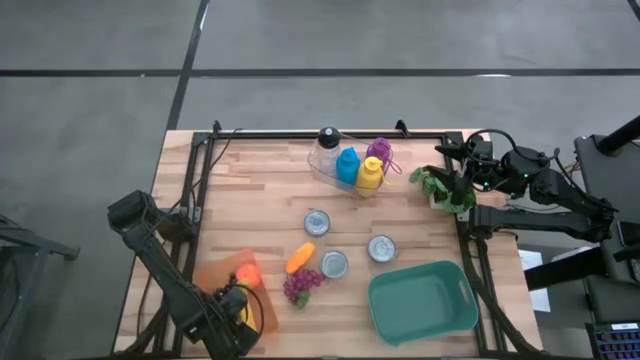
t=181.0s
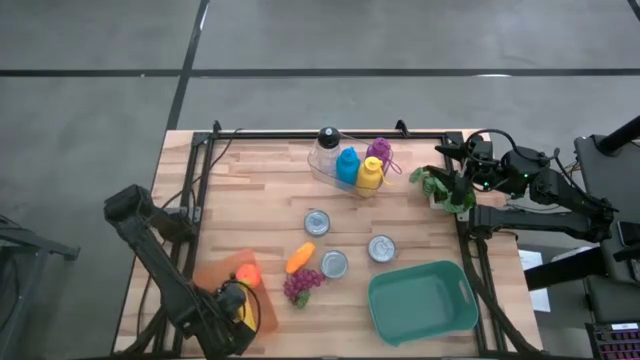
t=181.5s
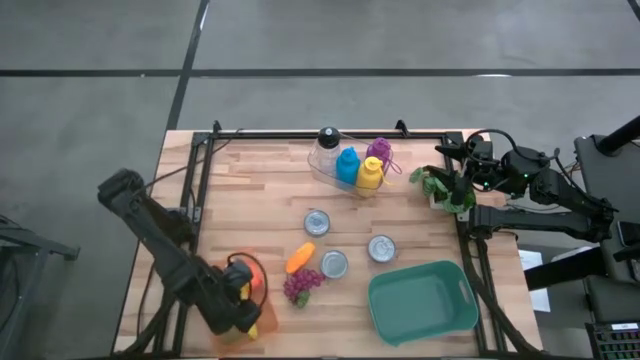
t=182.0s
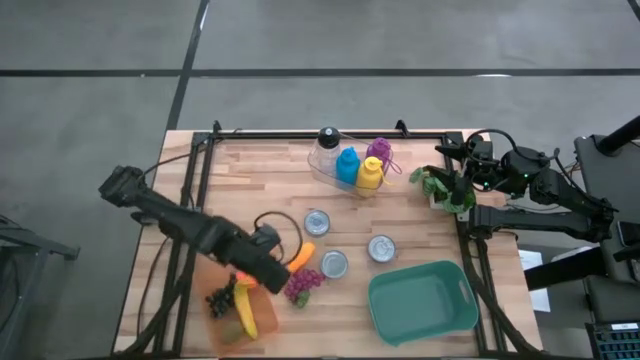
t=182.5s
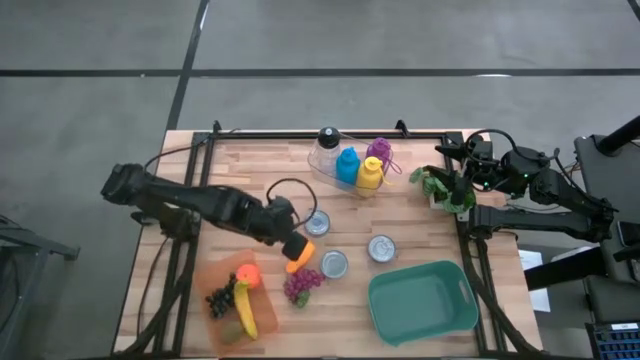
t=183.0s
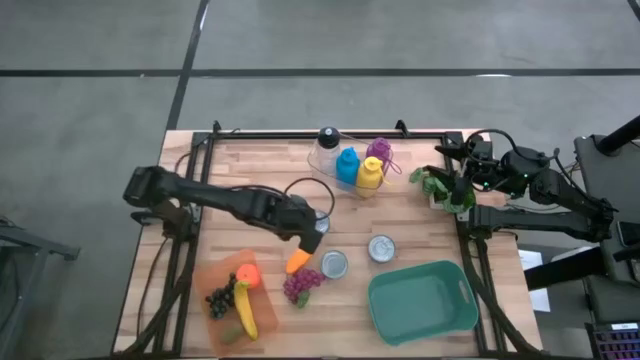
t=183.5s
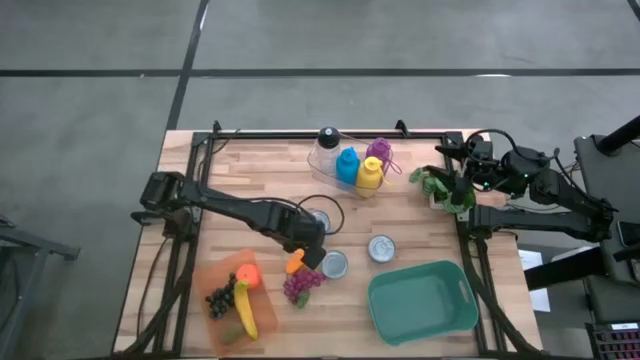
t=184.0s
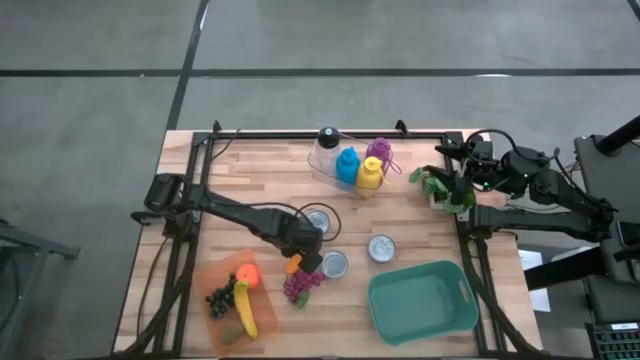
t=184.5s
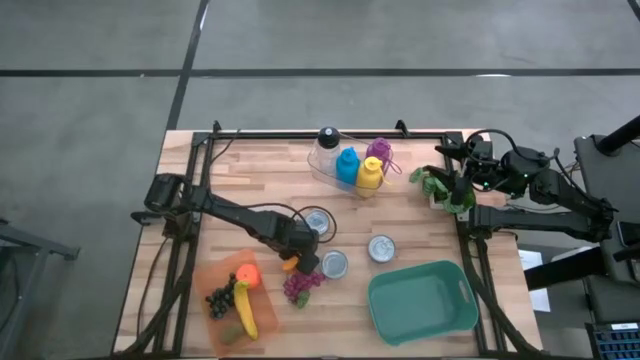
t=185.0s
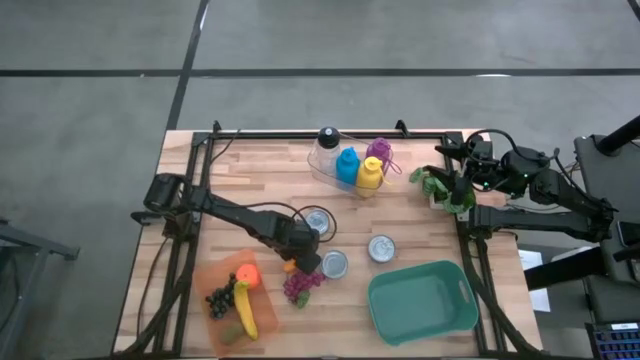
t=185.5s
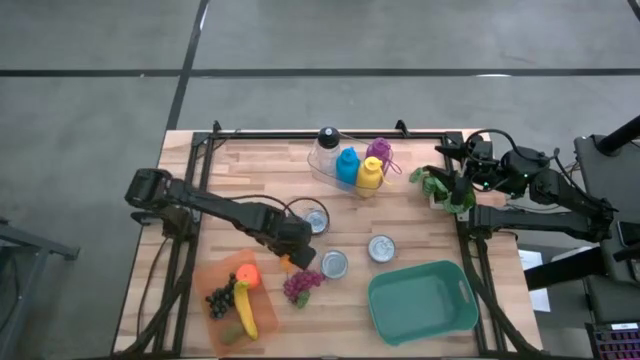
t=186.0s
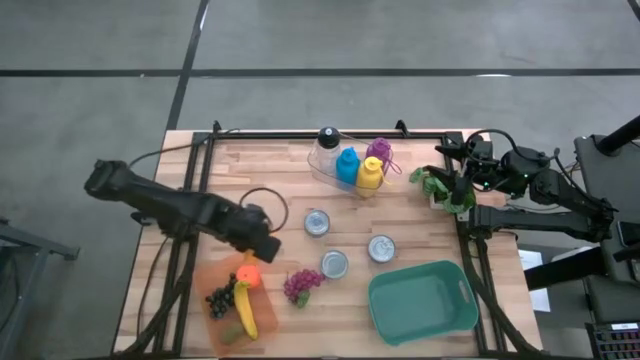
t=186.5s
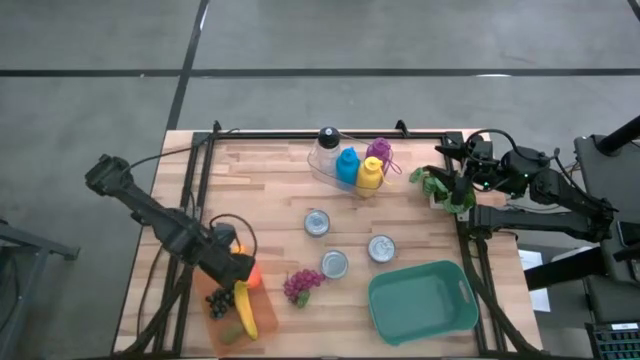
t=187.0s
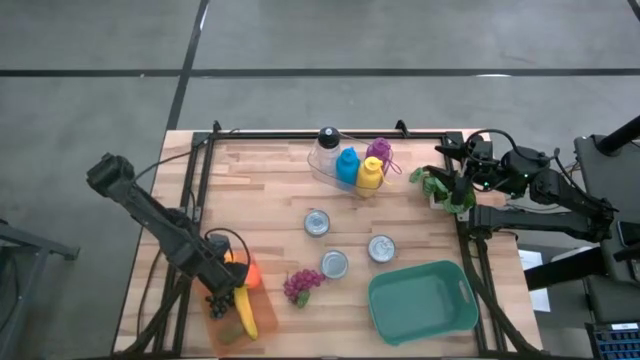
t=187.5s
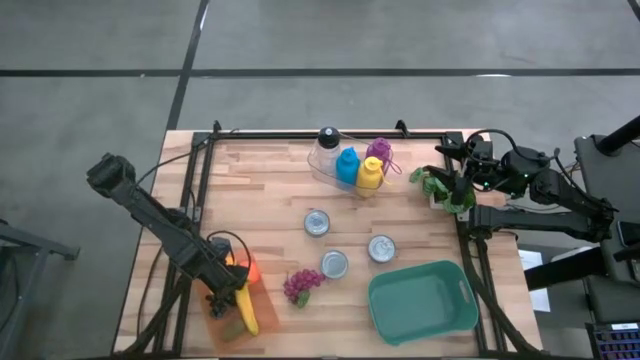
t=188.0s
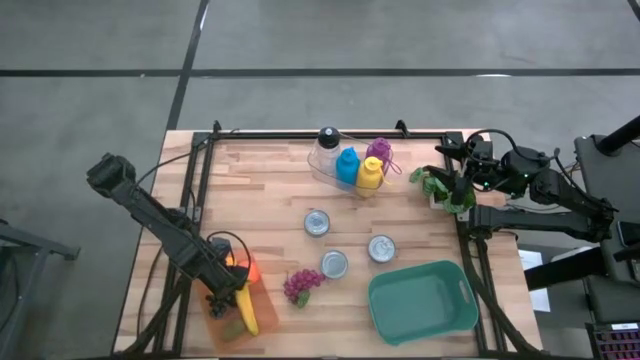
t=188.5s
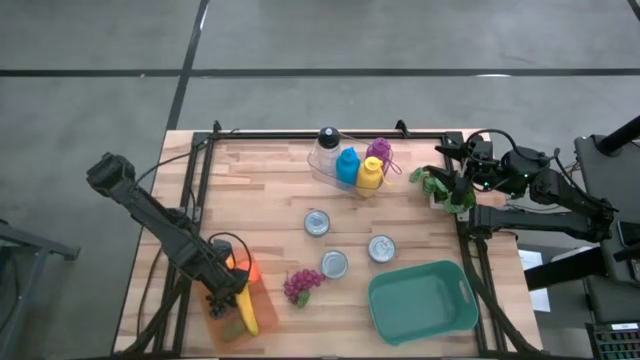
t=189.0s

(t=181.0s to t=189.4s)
Task: Pick & Place Food Item
Put the mango into the orange bin

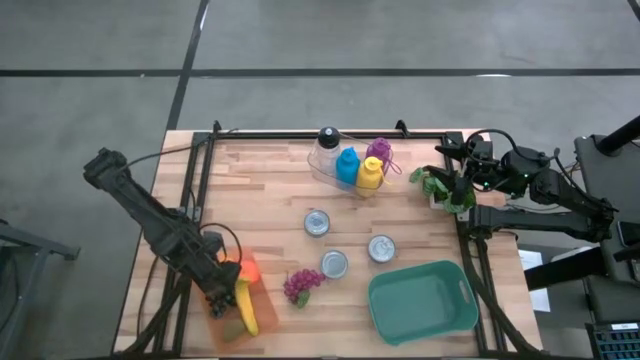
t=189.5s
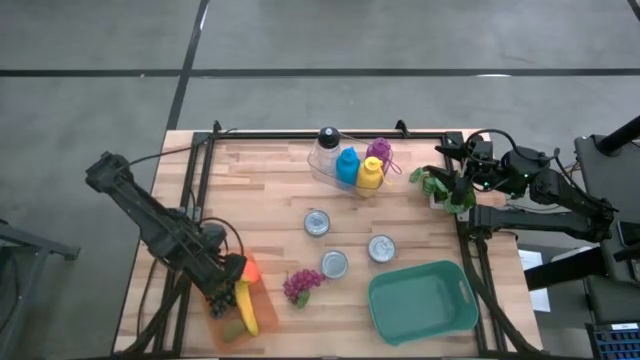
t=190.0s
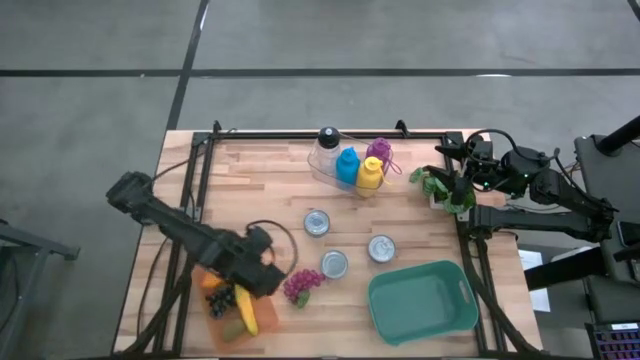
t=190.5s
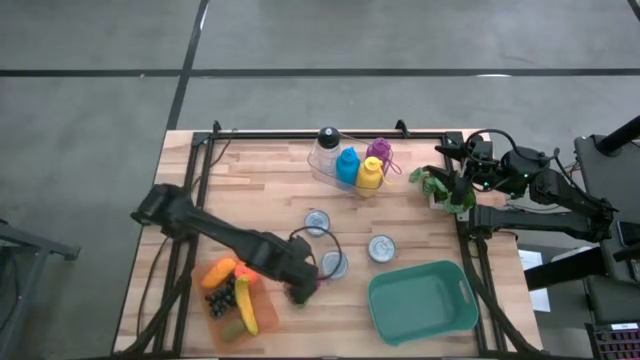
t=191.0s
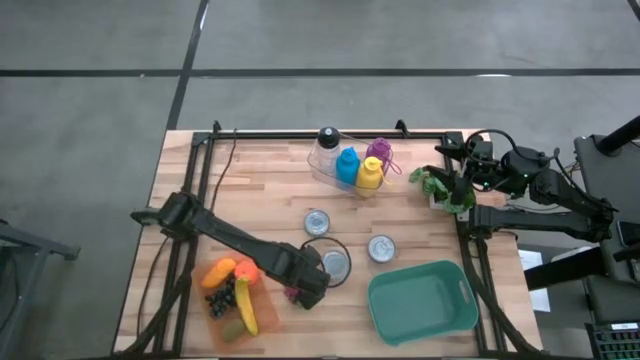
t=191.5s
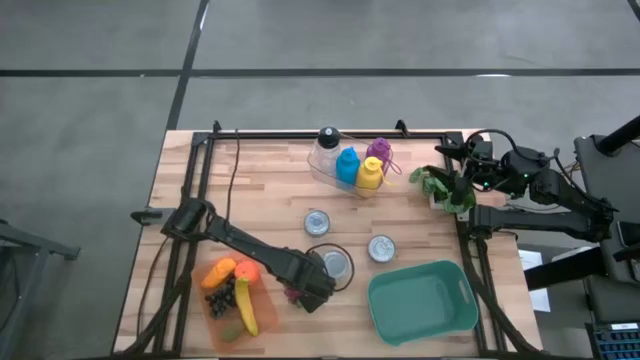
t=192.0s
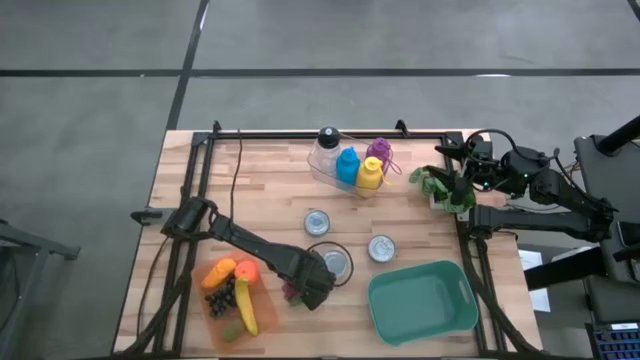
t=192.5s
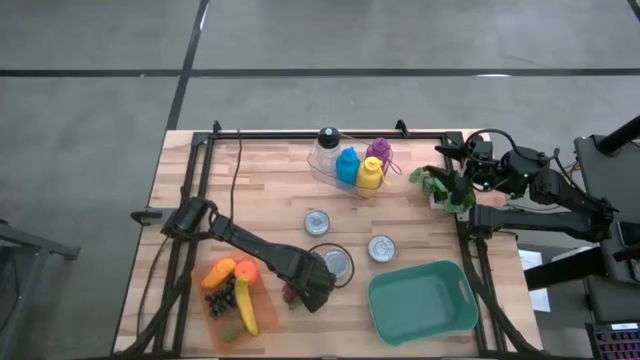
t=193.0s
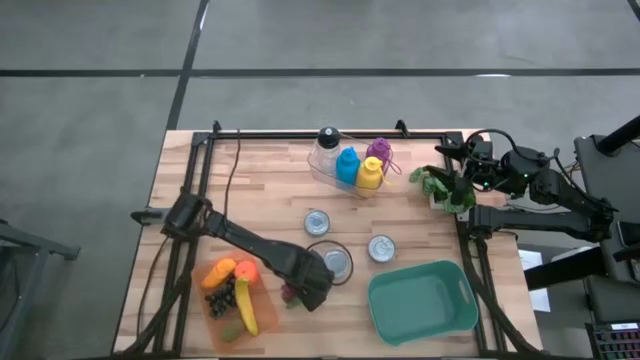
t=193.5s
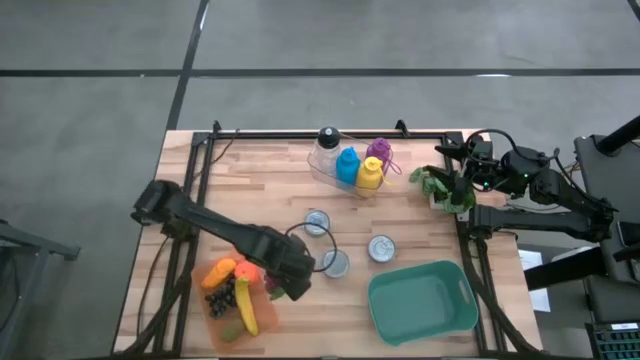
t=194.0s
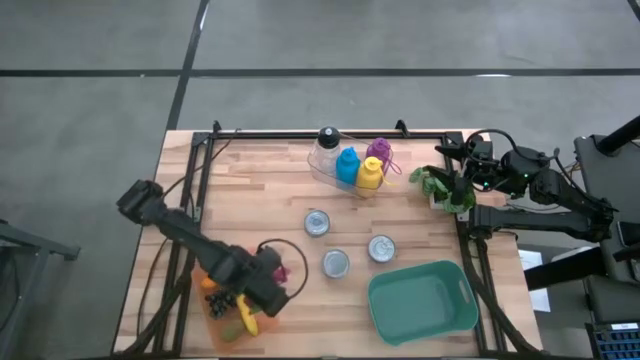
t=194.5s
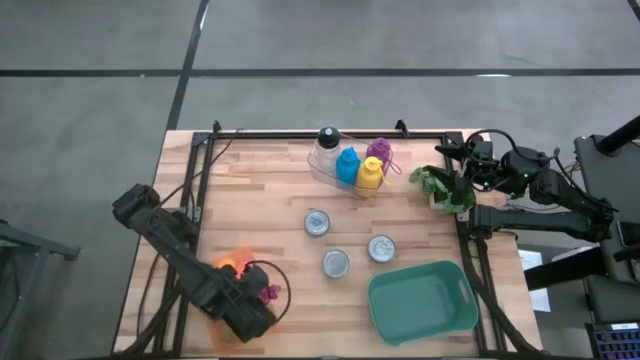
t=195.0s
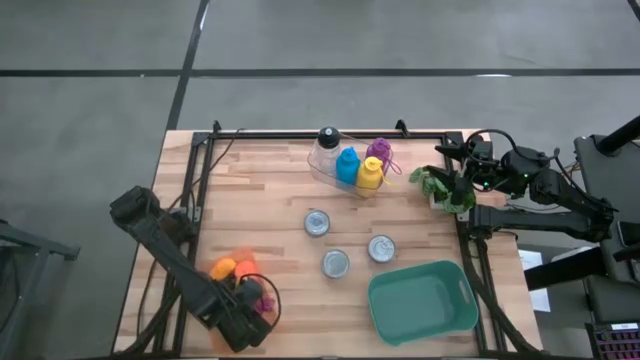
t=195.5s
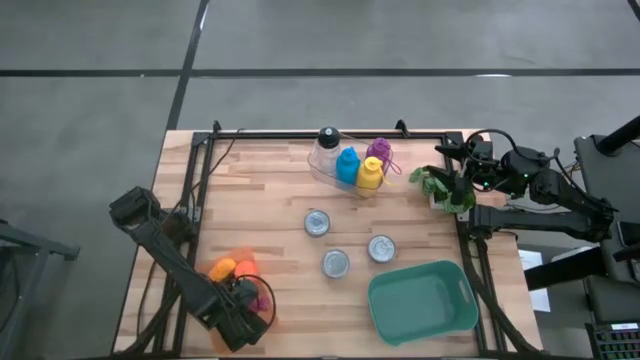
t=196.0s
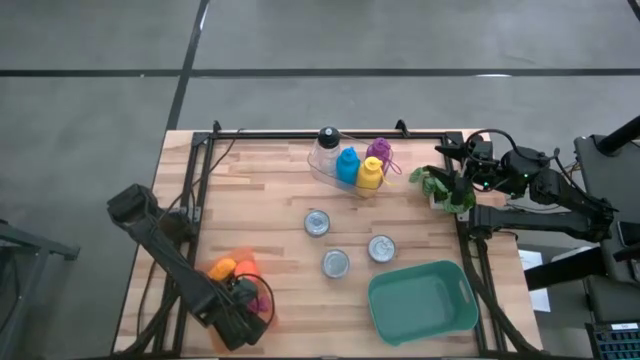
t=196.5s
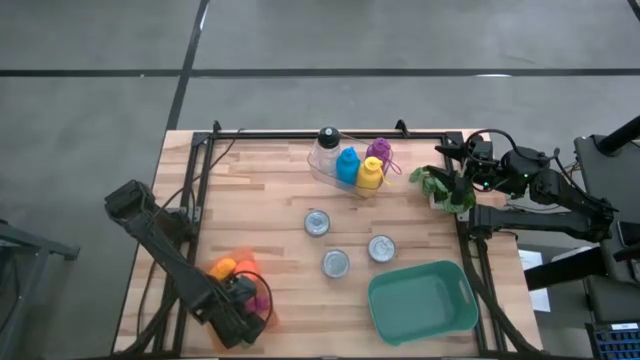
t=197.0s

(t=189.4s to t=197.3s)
Put the purple grapes into the orange bin

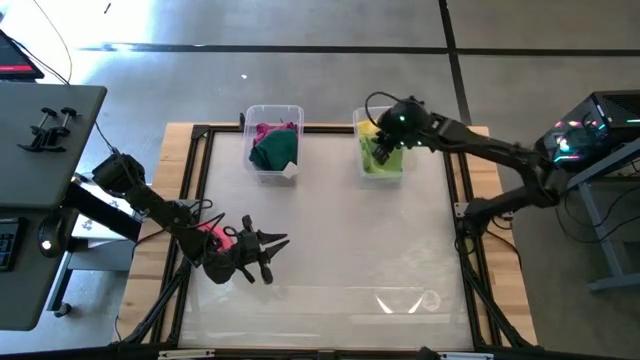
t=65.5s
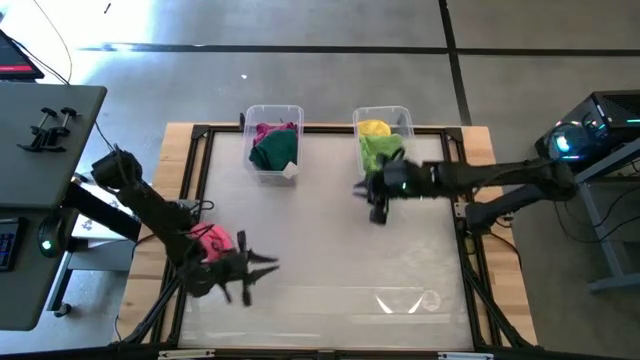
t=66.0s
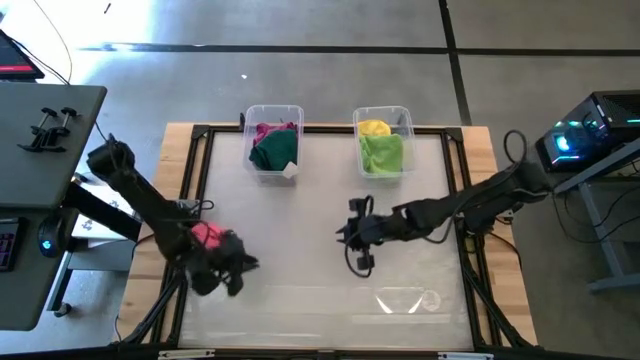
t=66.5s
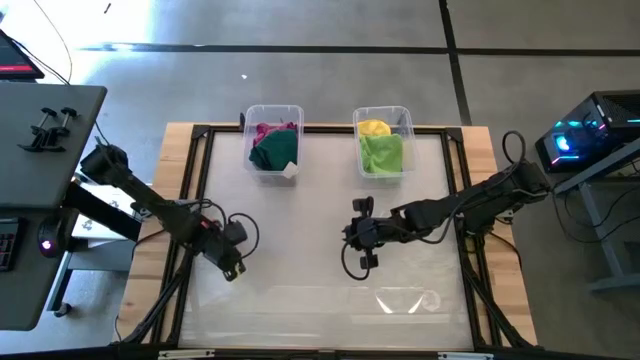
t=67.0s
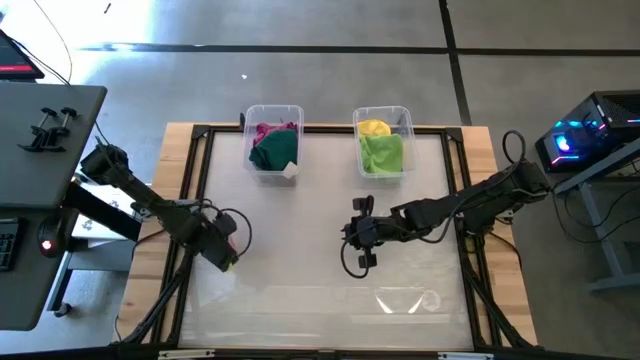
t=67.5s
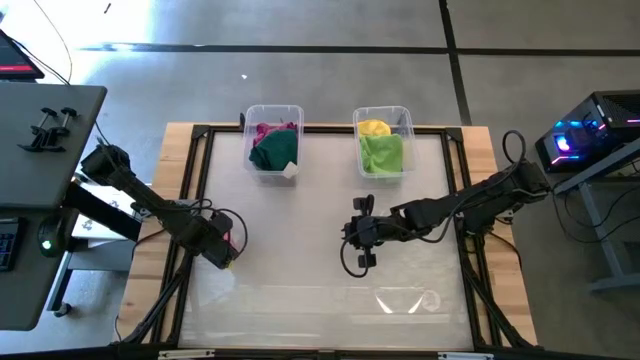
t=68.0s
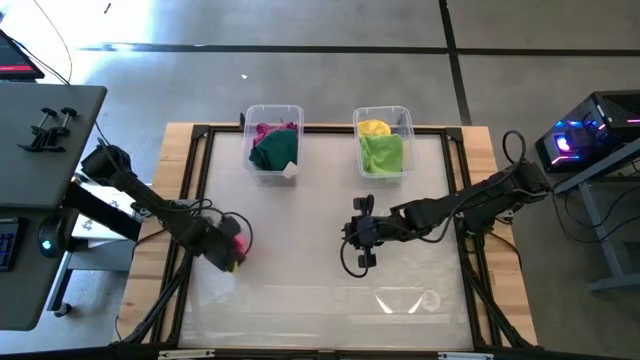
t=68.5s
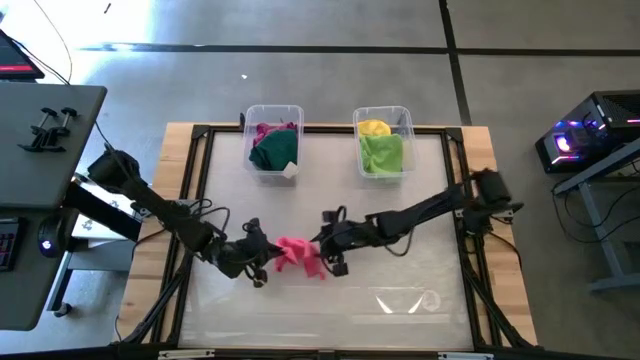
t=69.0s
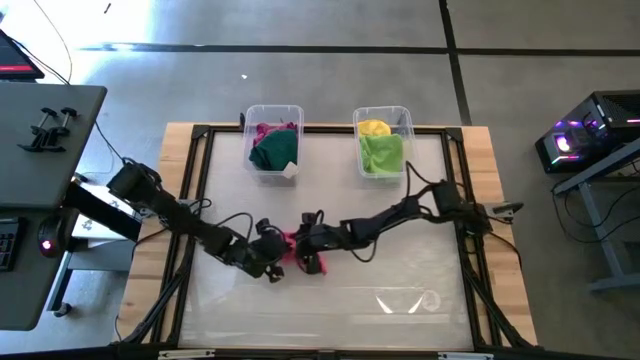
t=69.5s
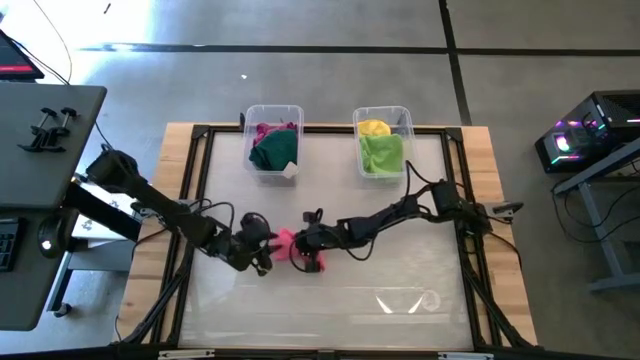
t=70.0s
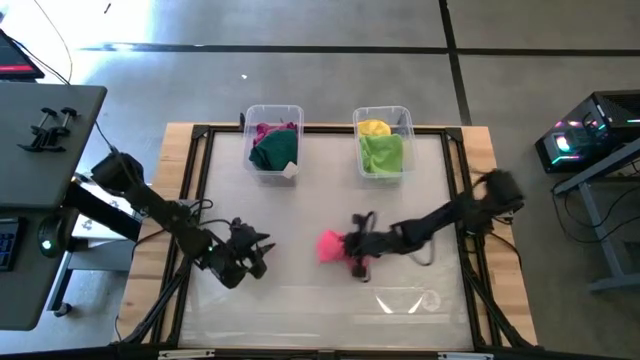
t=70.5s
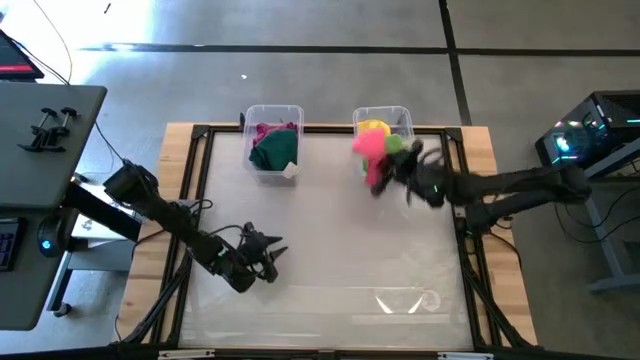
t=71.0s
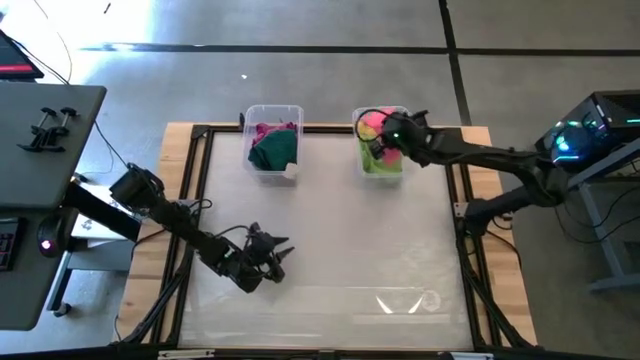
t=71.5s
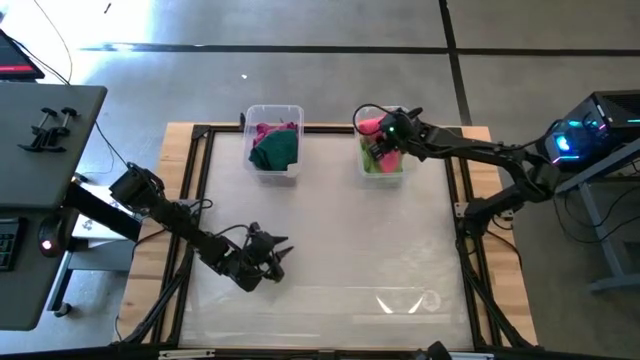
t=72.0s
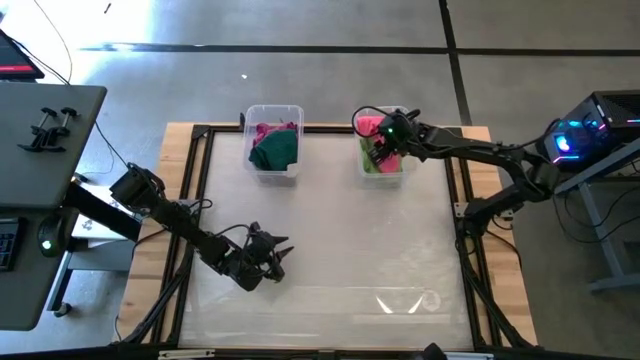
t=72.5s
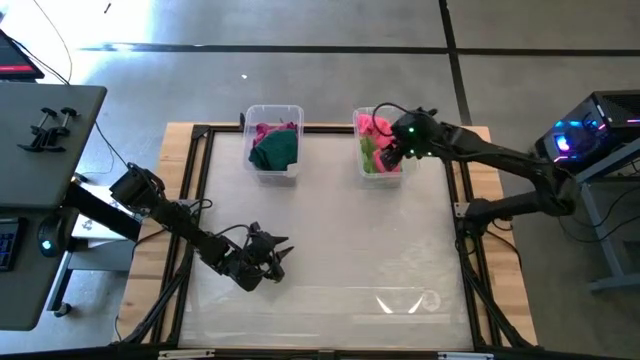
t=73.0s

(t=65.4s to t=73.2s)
Task: Sort towels by color in basket
Put the pink microfiber cloth into the right transparent bin
